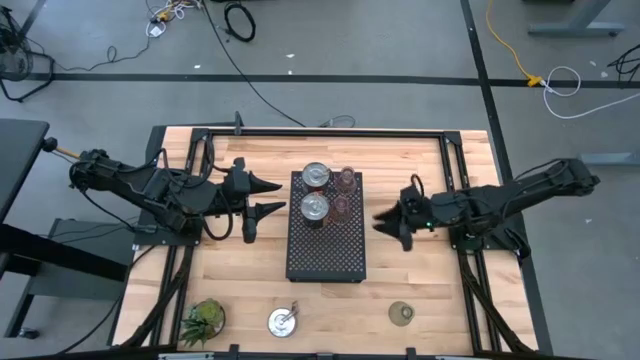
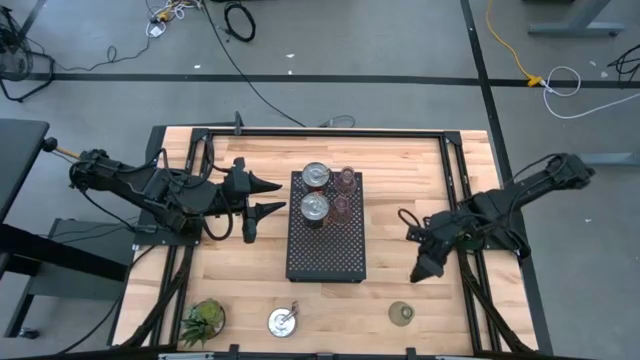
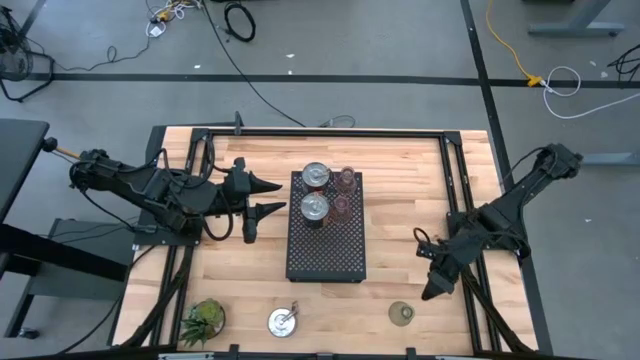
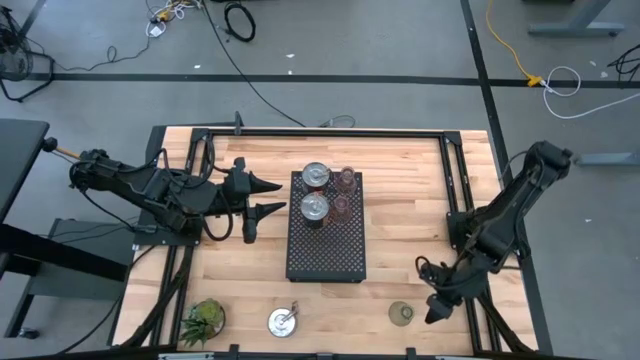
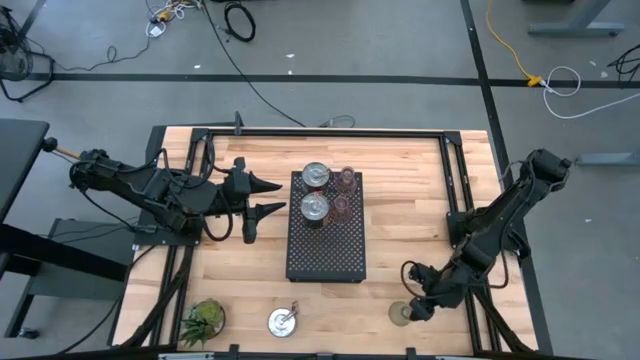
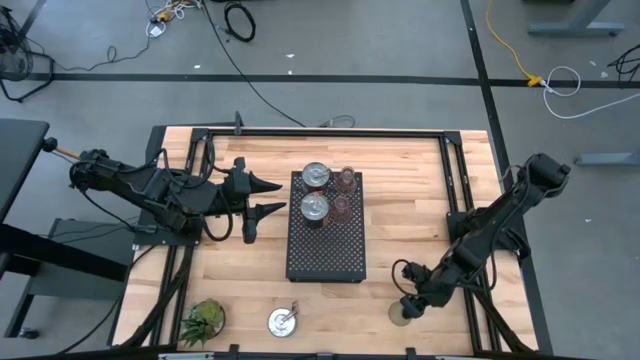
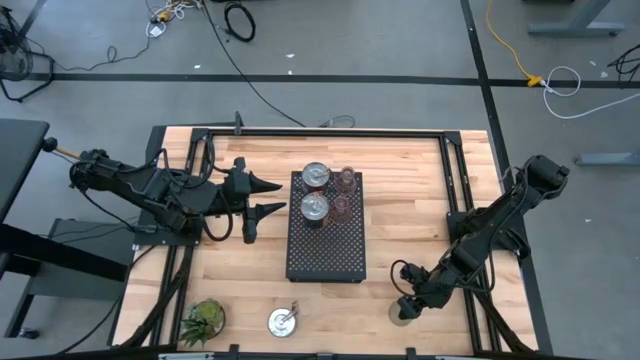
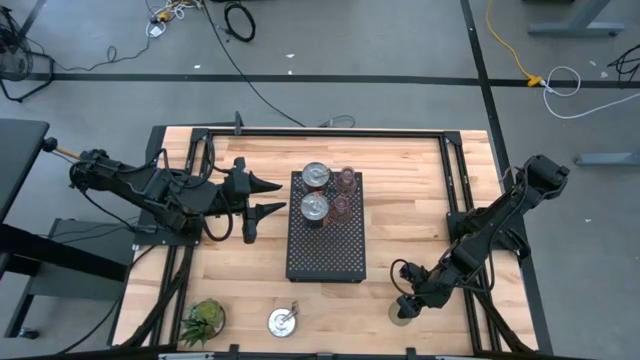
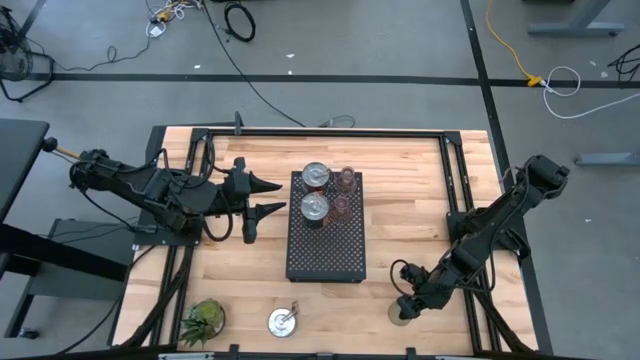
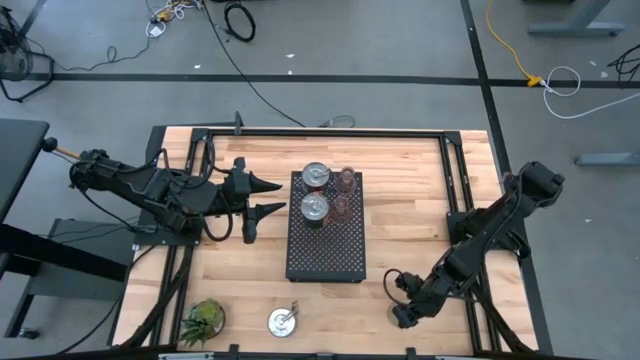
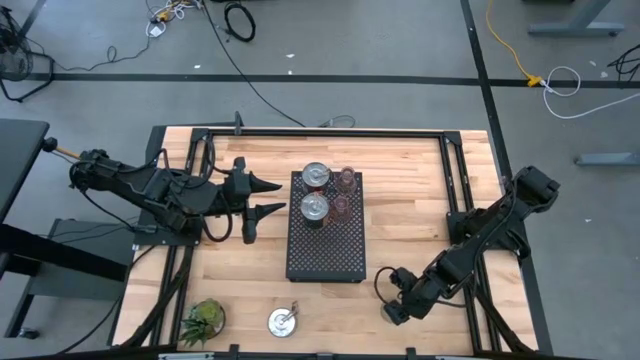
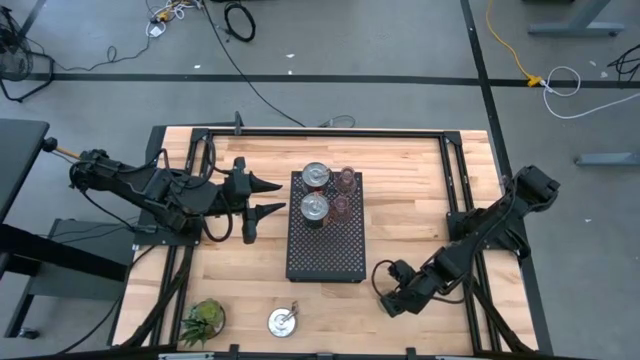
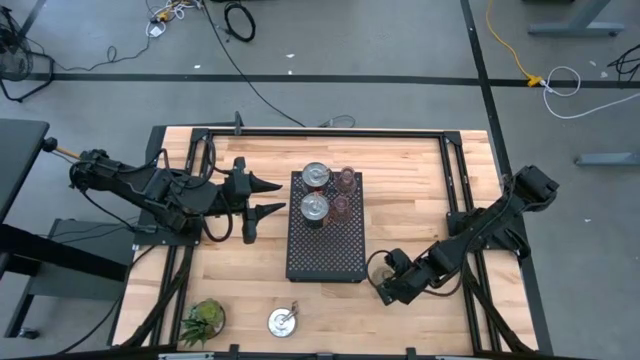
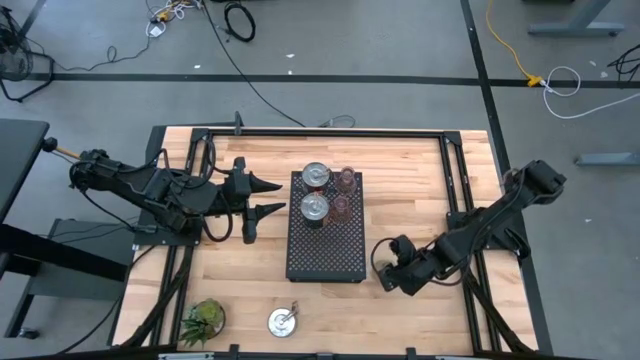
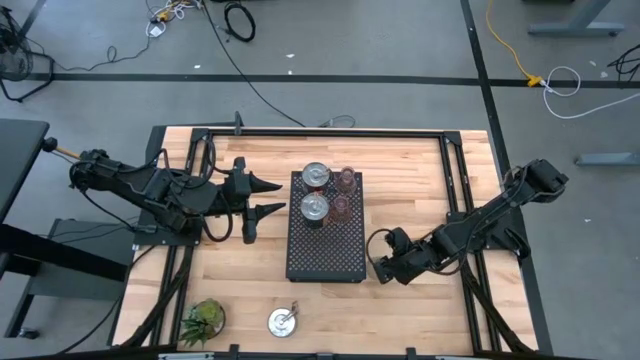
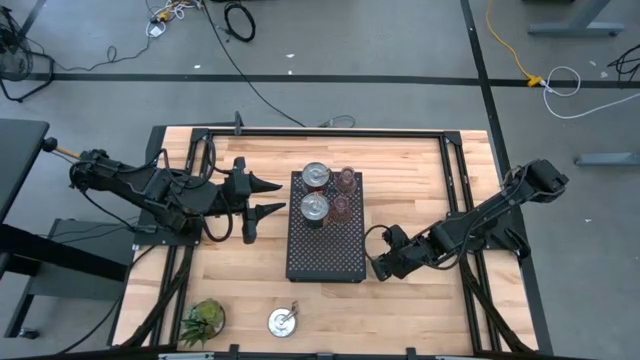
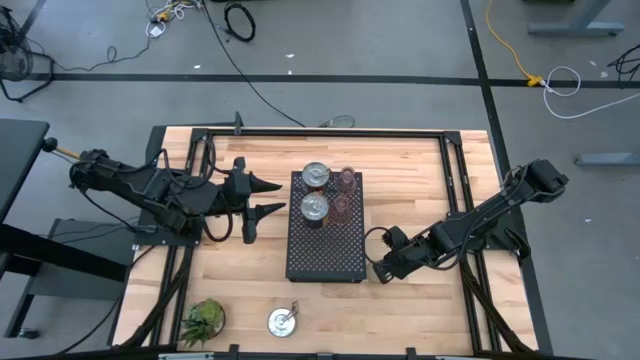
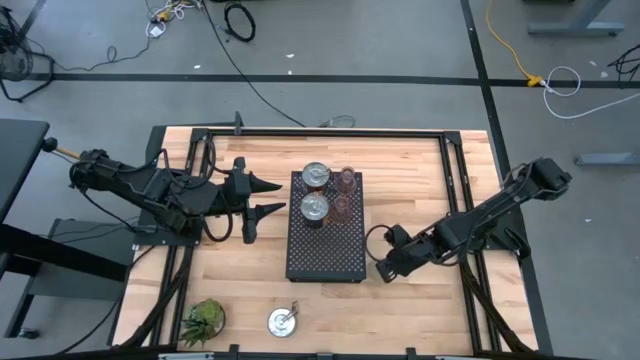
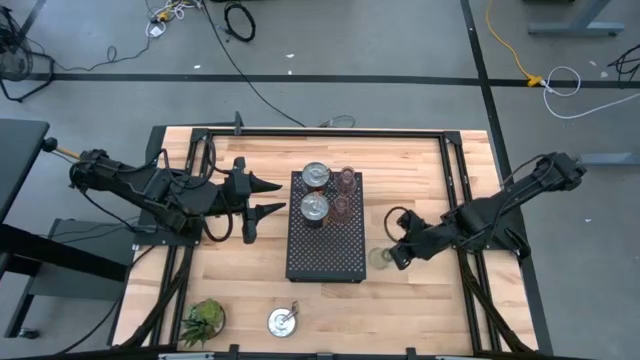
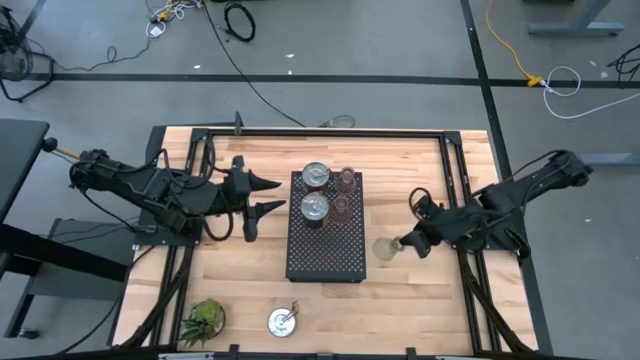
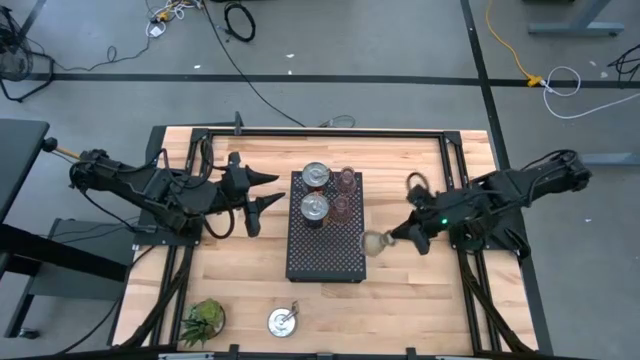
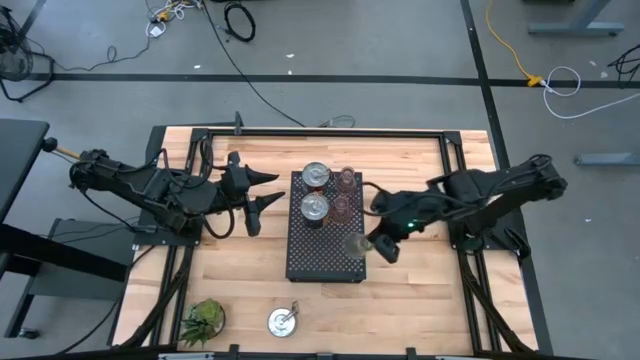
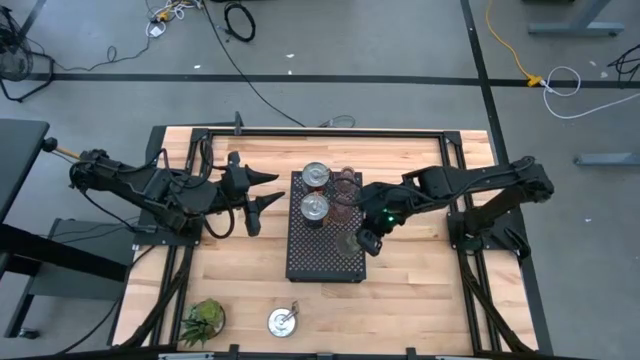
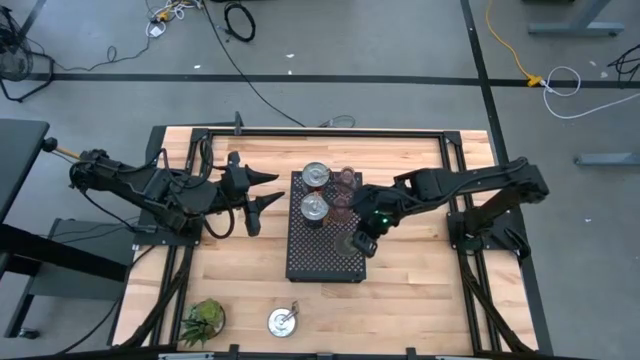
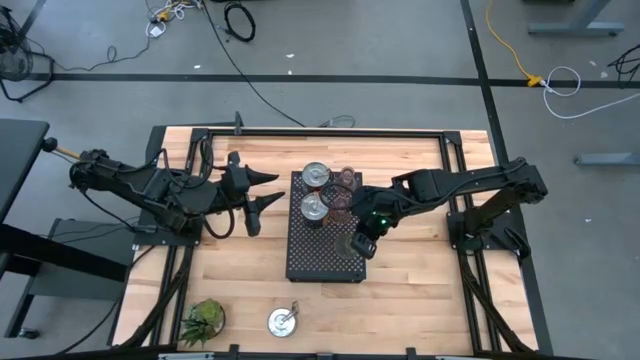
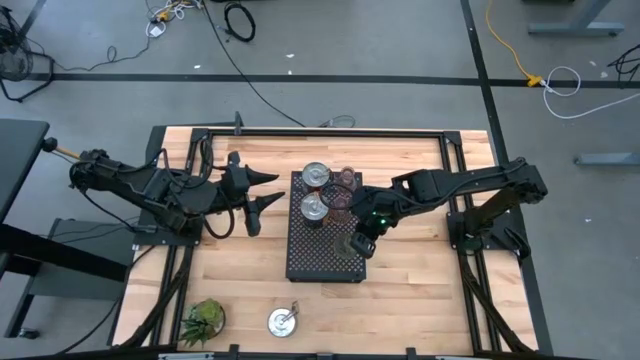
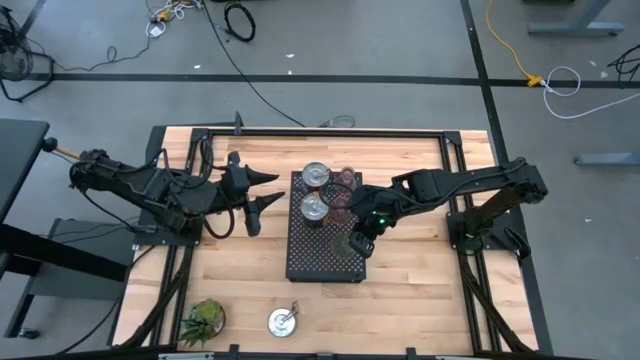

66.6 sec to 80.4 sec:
Task: Pick & Place candle stick holders
Put the green glass candle holder on the shelf aligned with the other glass candle holders

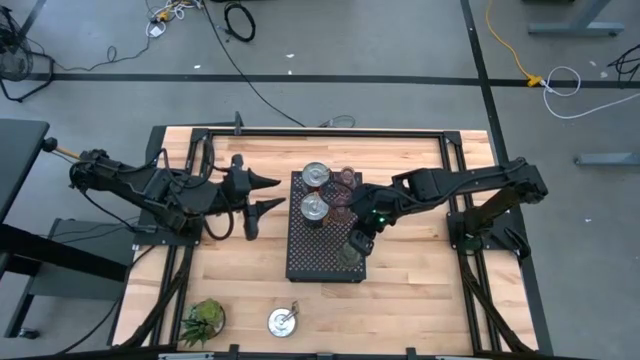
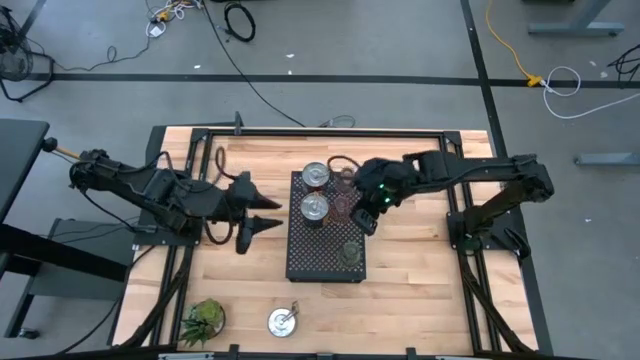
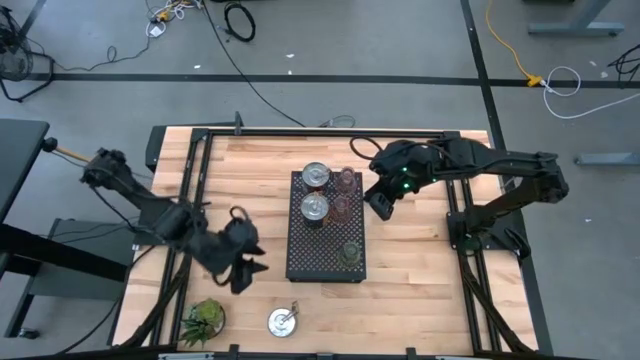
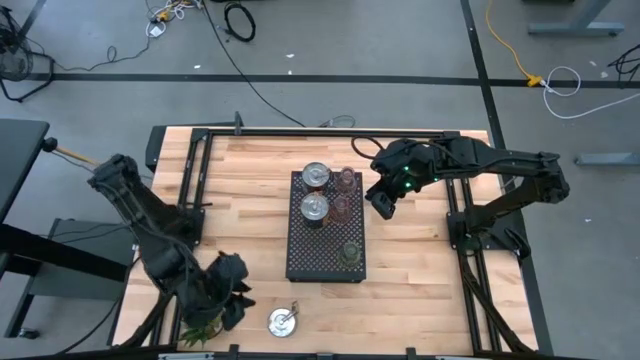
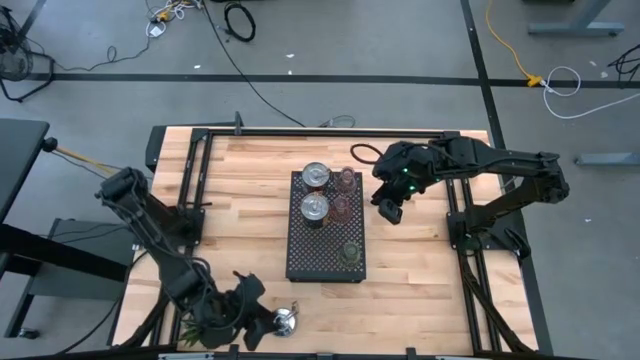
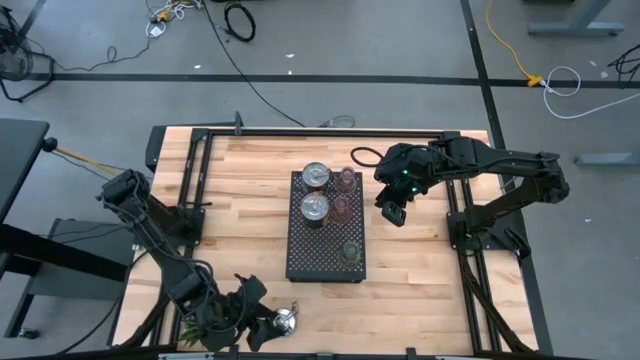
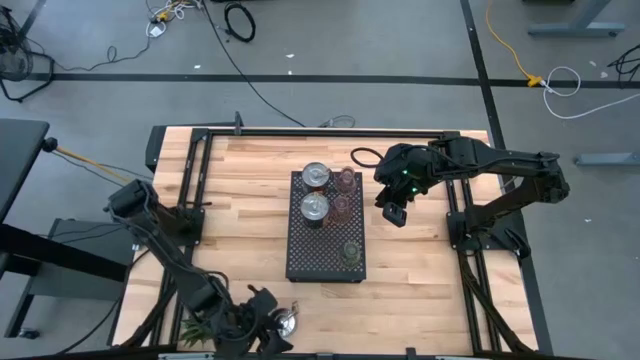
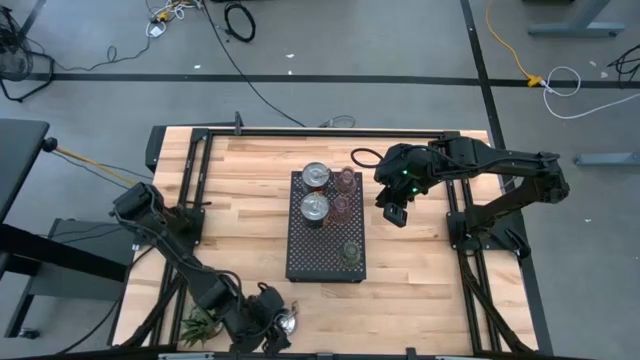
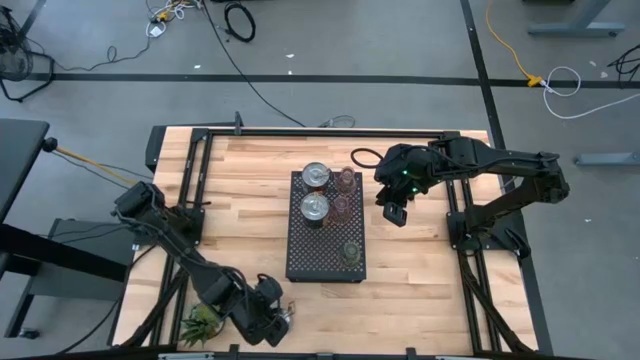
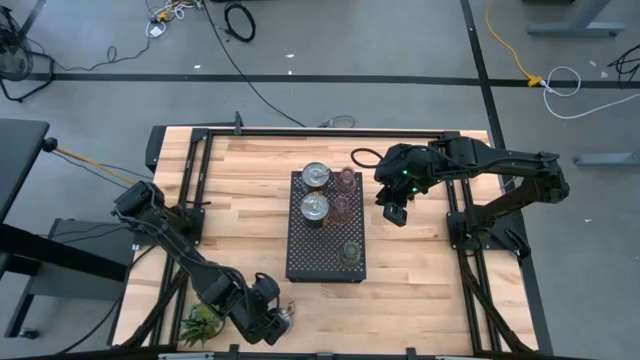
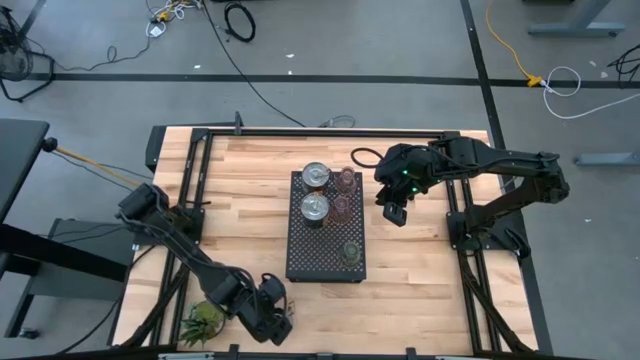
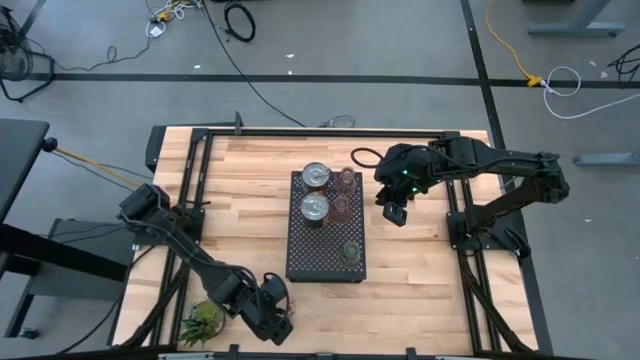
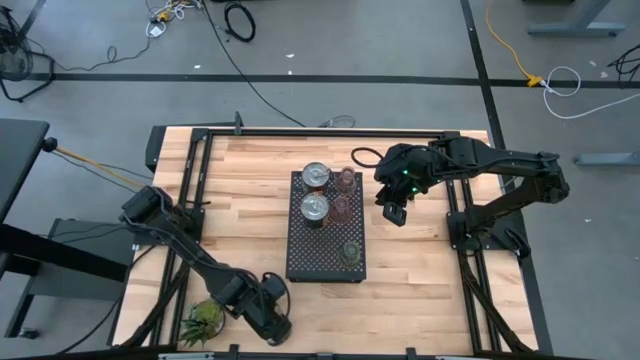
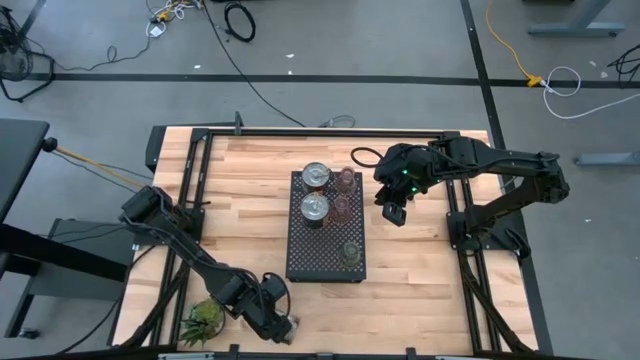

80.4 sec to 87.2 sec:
Put the silver scented candle on the shelf aligned with the other scented candles

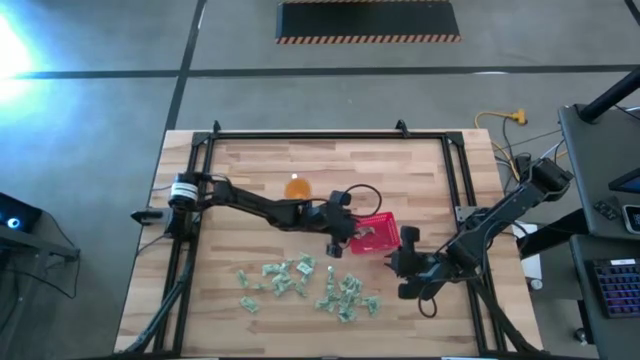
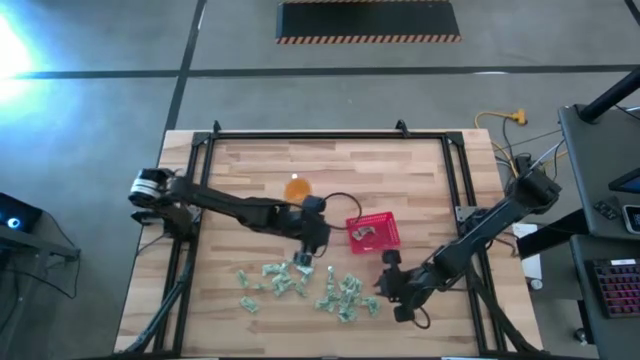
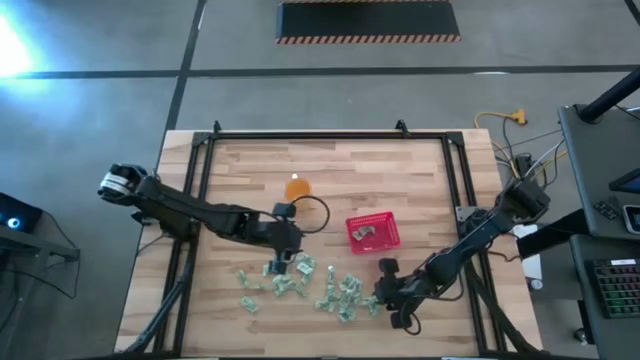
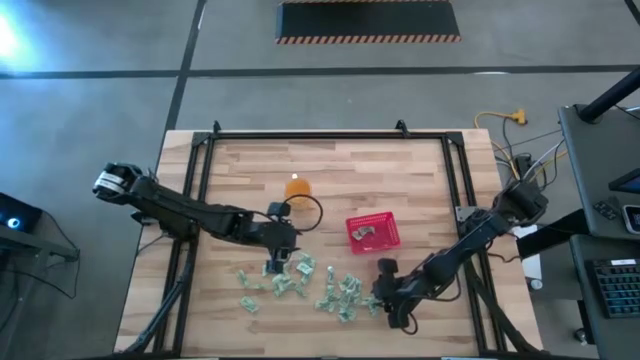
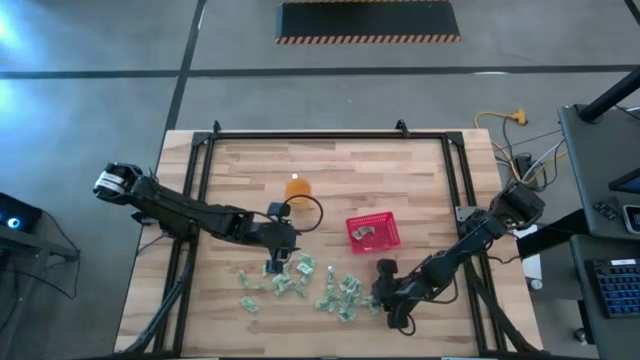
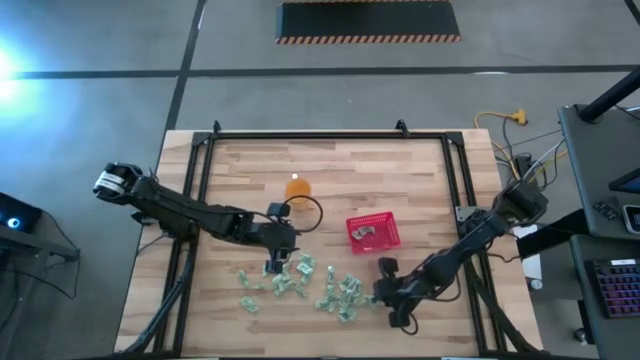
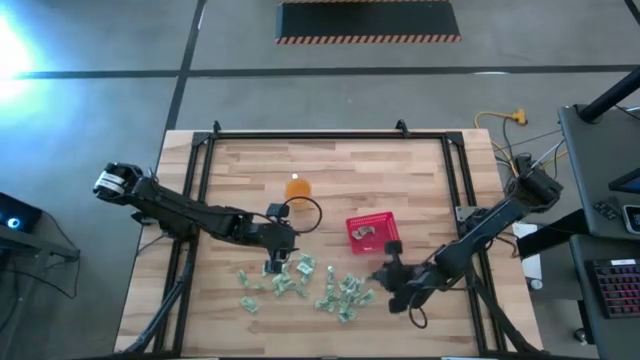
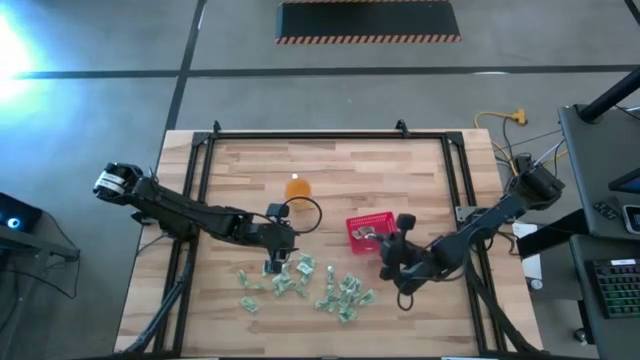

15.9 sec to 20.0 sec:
Task: Pick and place Stevia / Truvia into bins
Put the stevia packet into the basket
